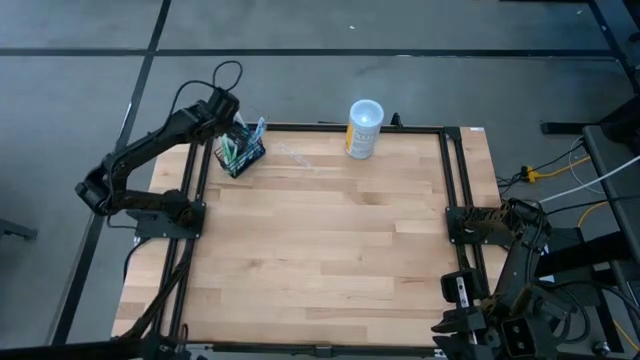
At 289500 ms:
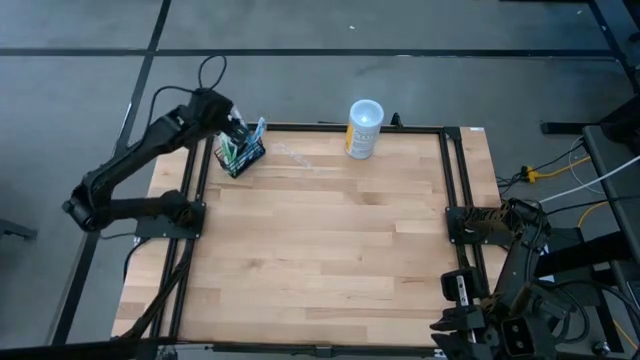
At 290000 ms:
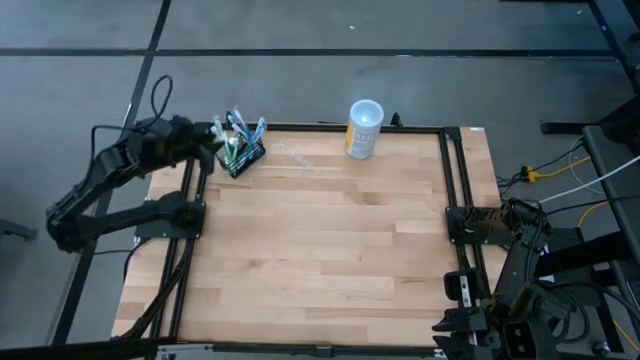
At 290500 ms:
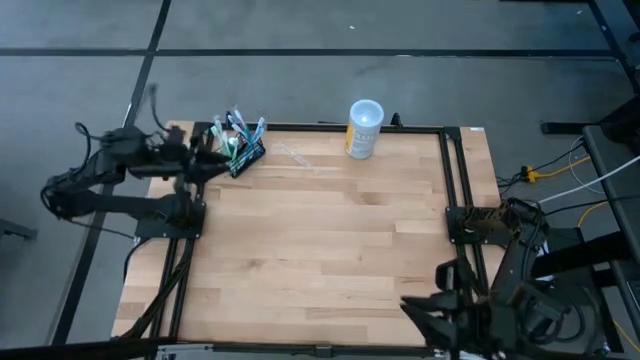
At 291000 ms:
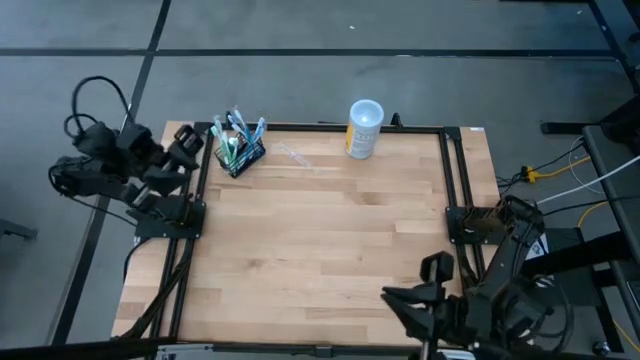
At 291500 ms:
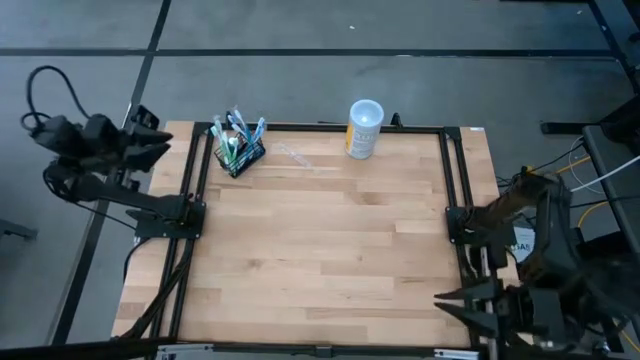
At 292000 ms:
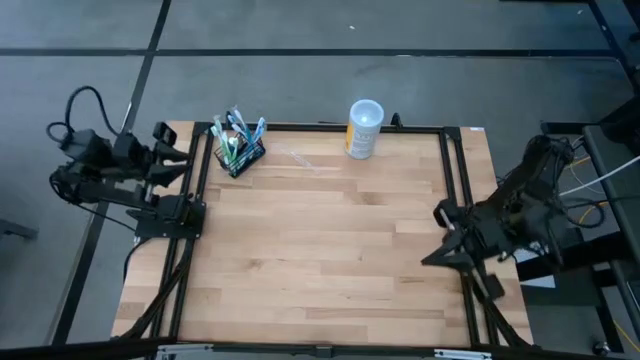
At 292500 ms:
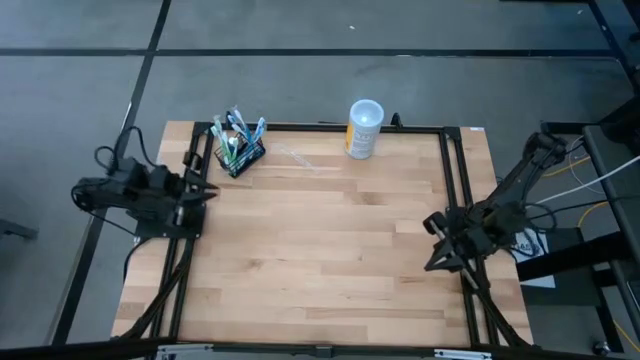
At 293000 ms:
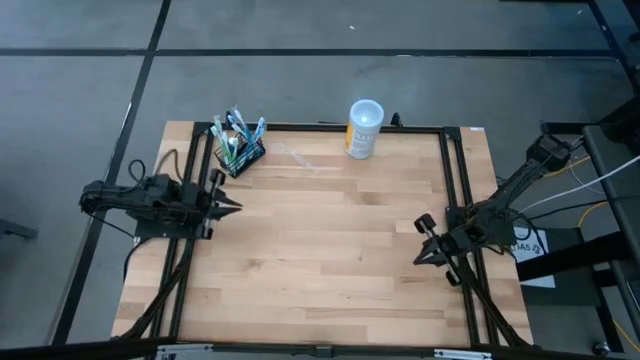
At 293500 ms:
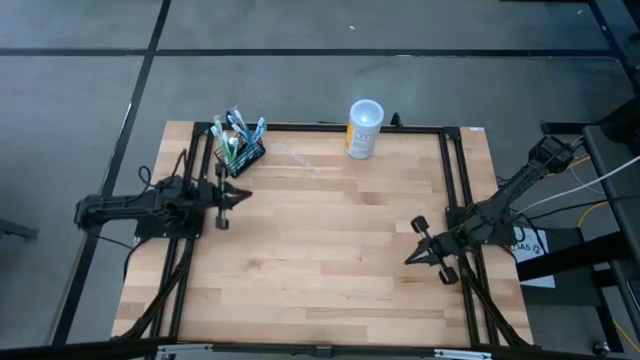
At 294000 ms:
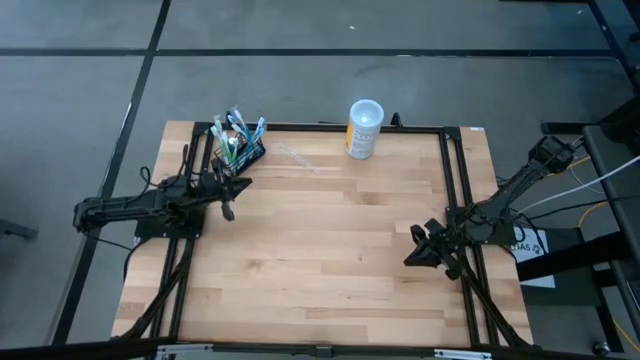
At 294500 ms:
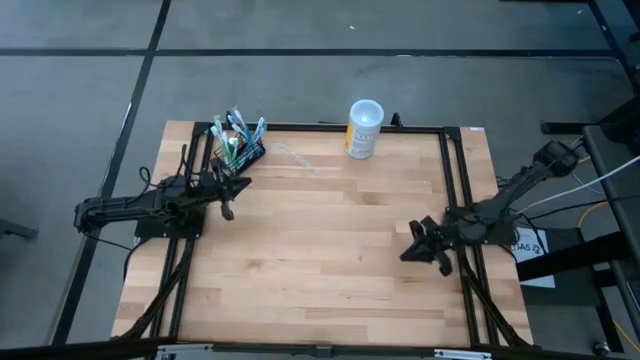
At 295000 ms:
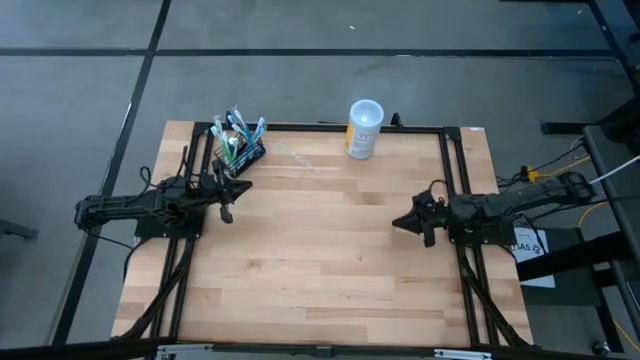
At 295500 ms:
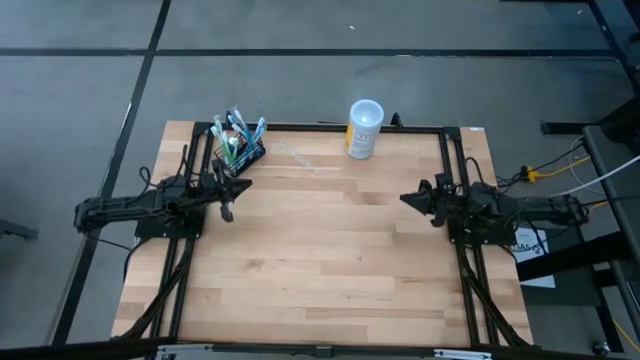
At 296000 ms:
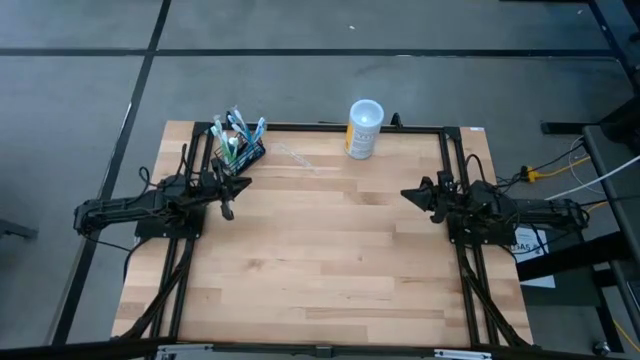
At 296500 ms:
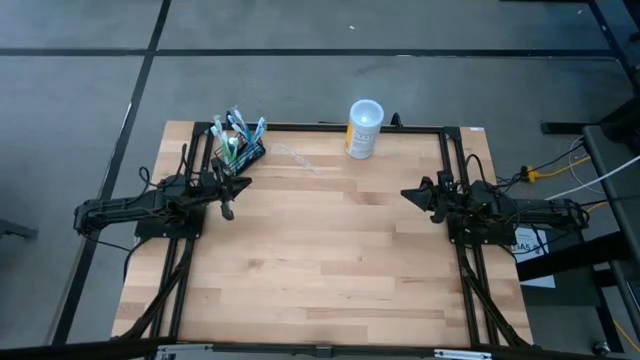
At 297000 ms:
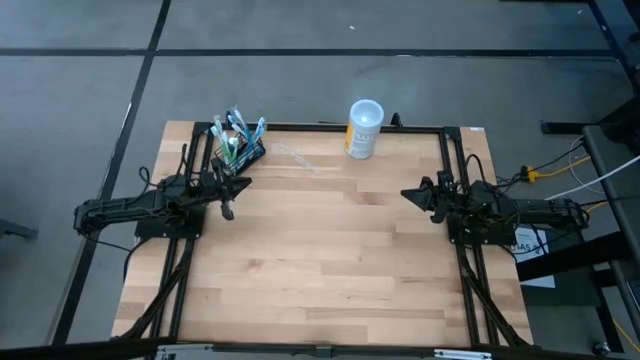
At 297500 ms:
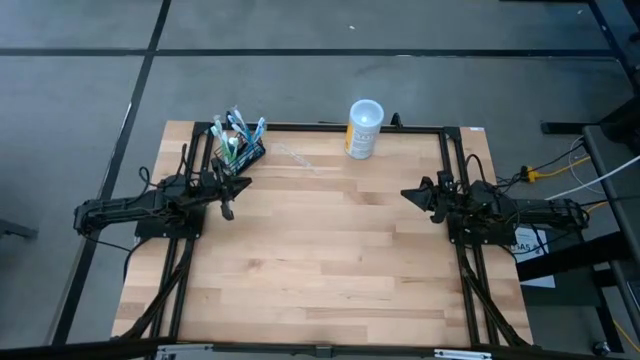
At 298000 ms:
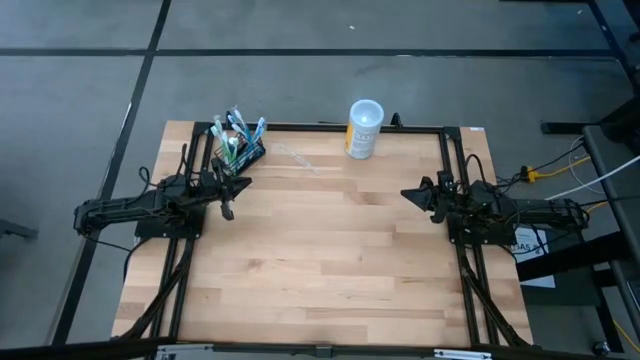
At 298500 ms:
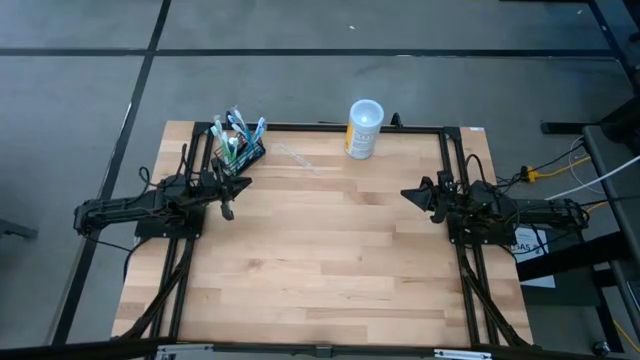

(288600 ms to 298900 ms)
Task: Pick & Place toothbrushing station
Return to Home Position

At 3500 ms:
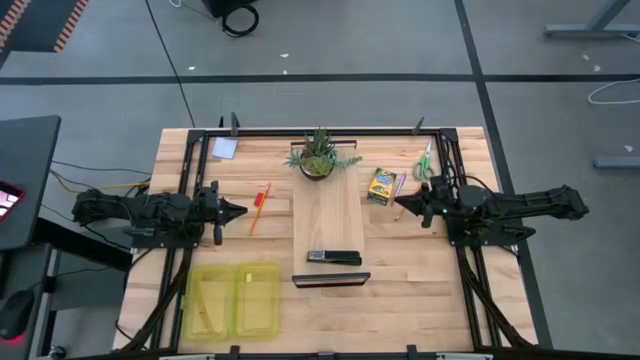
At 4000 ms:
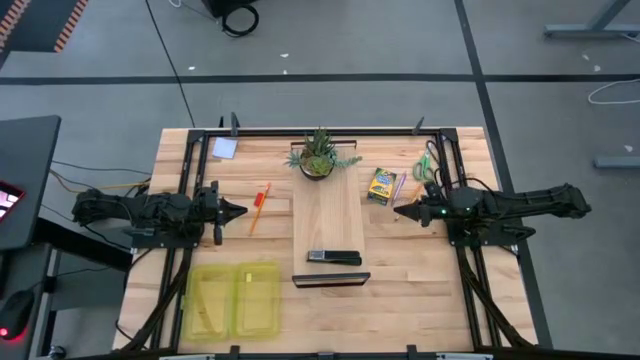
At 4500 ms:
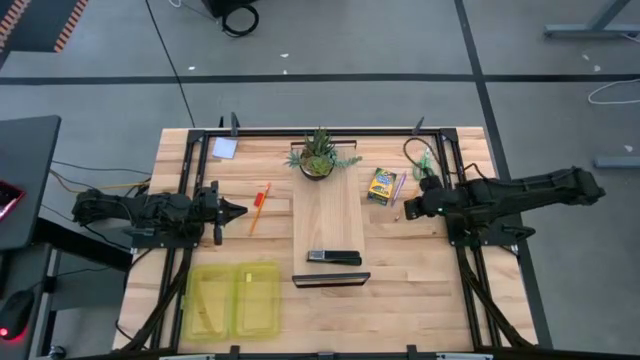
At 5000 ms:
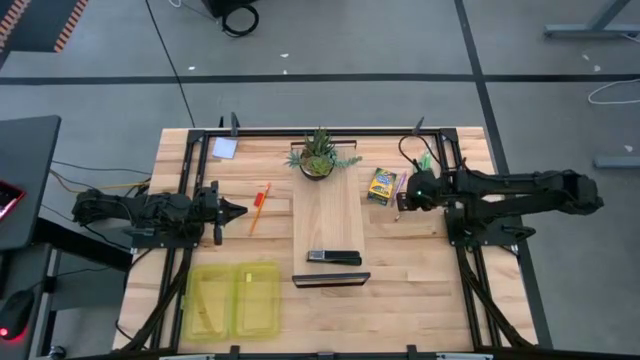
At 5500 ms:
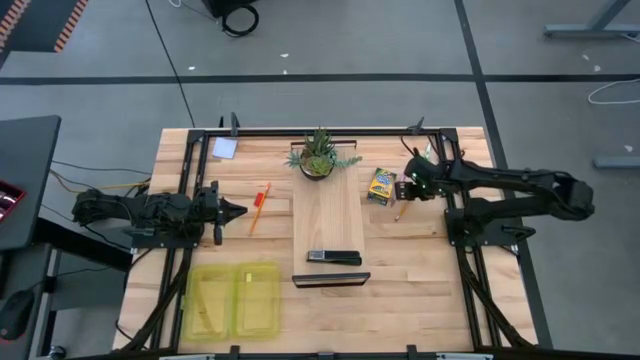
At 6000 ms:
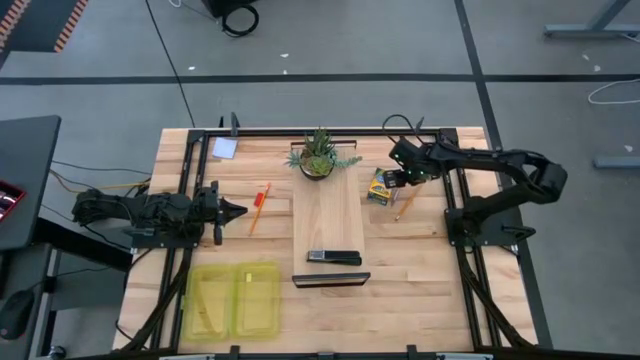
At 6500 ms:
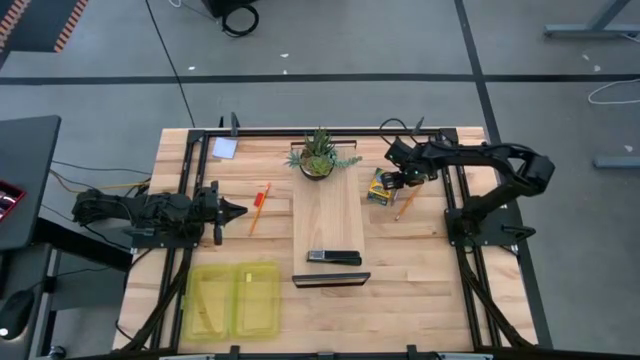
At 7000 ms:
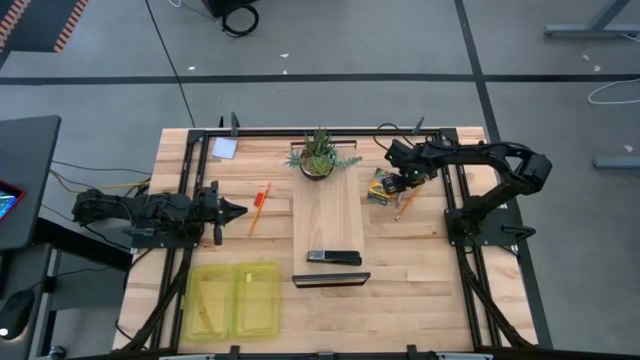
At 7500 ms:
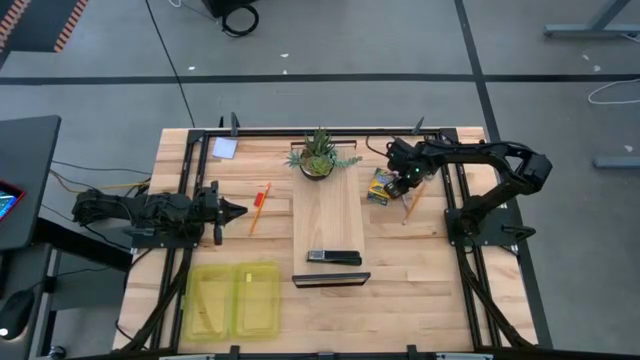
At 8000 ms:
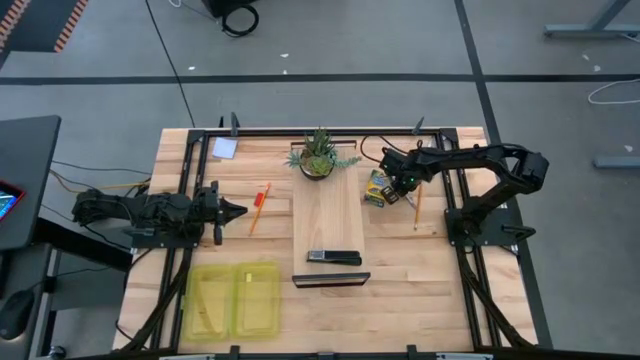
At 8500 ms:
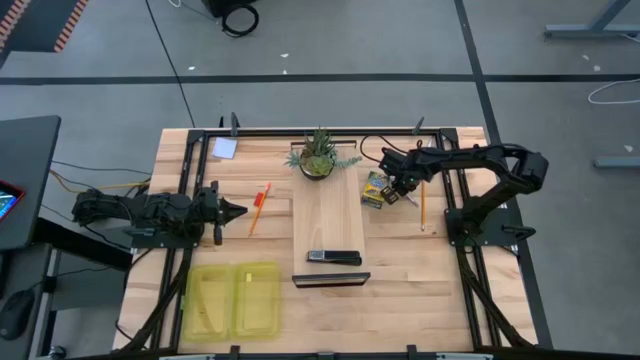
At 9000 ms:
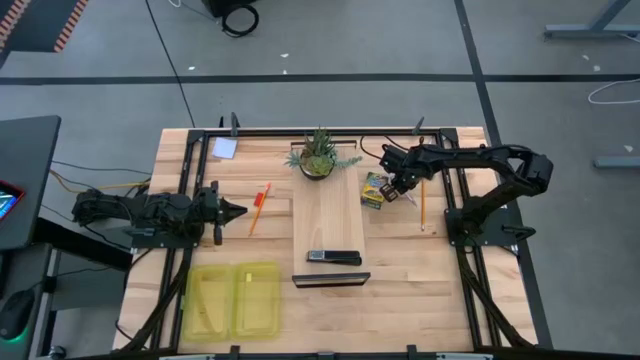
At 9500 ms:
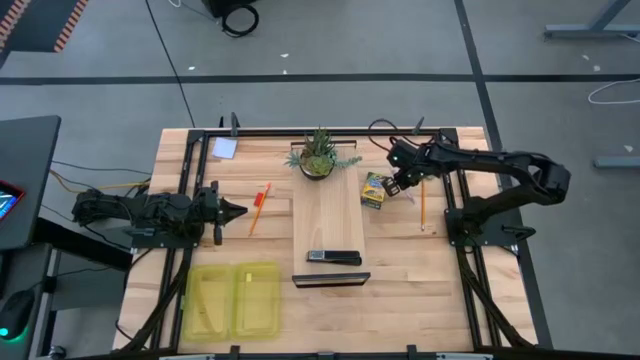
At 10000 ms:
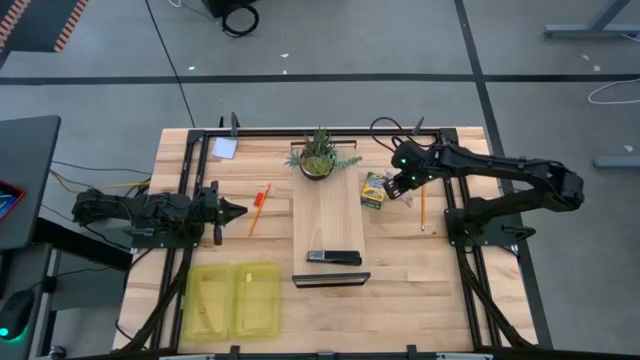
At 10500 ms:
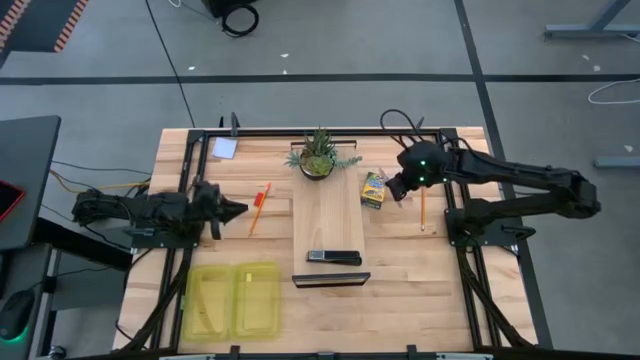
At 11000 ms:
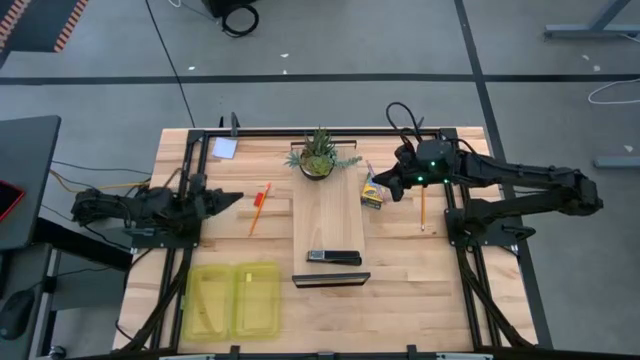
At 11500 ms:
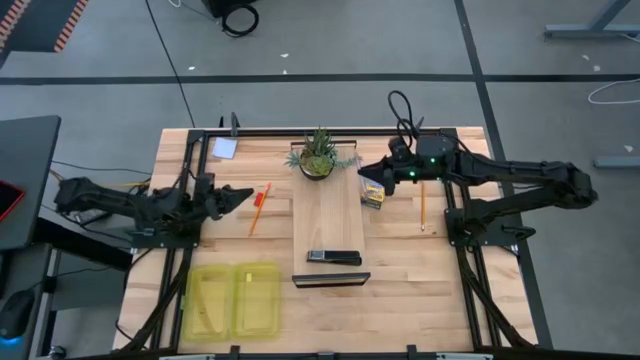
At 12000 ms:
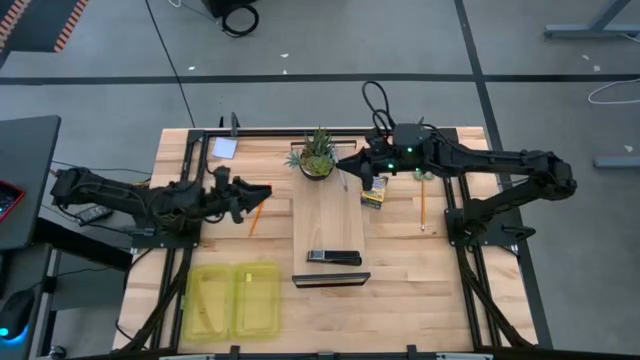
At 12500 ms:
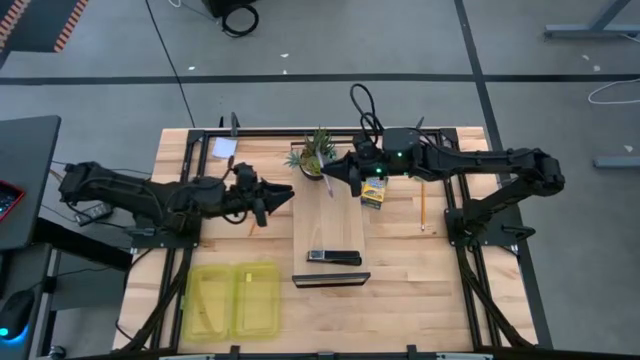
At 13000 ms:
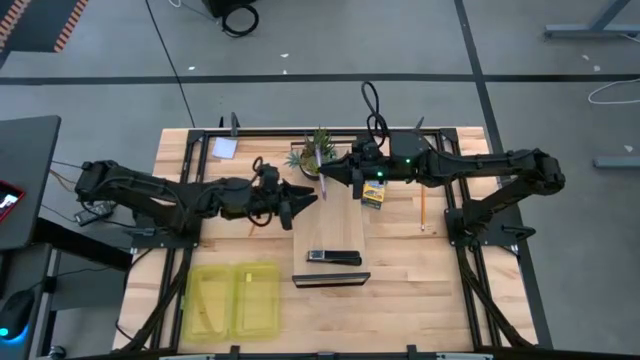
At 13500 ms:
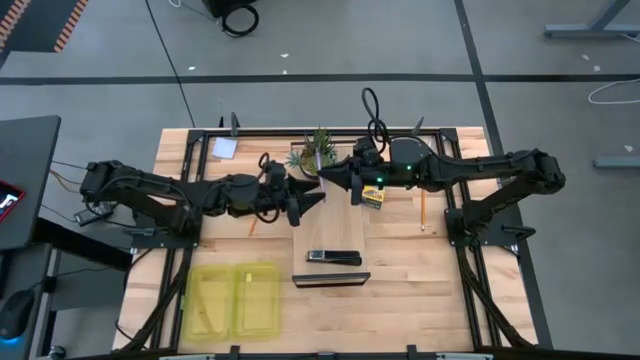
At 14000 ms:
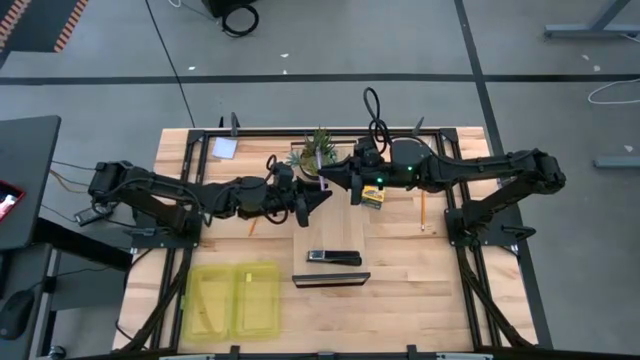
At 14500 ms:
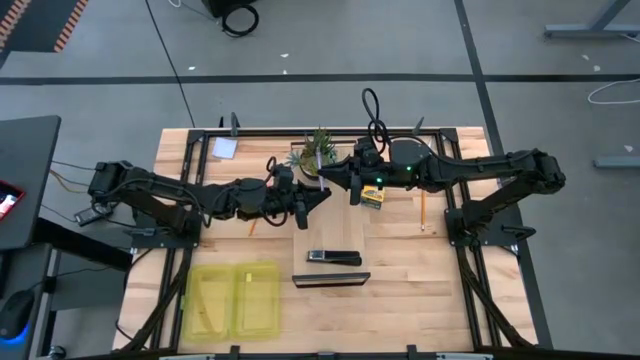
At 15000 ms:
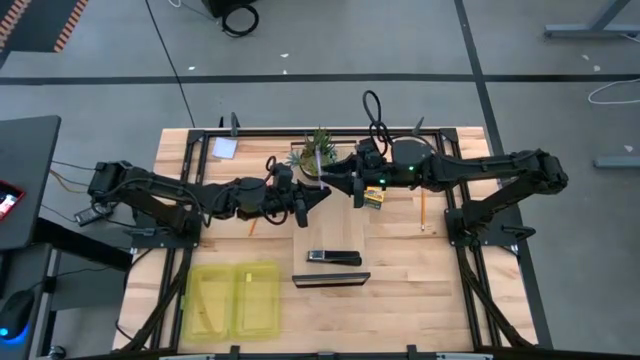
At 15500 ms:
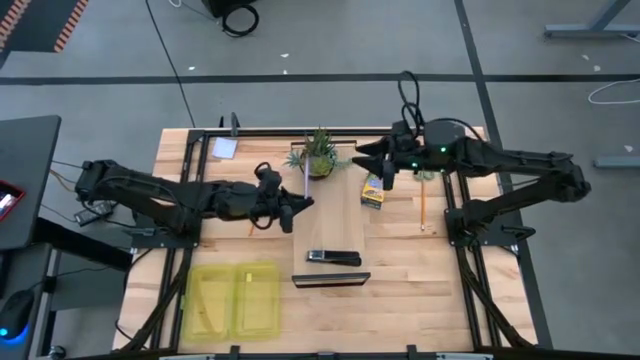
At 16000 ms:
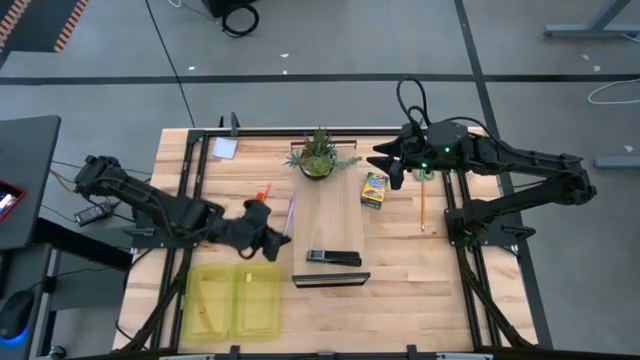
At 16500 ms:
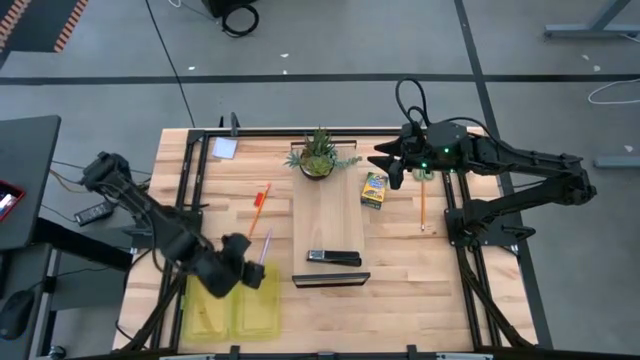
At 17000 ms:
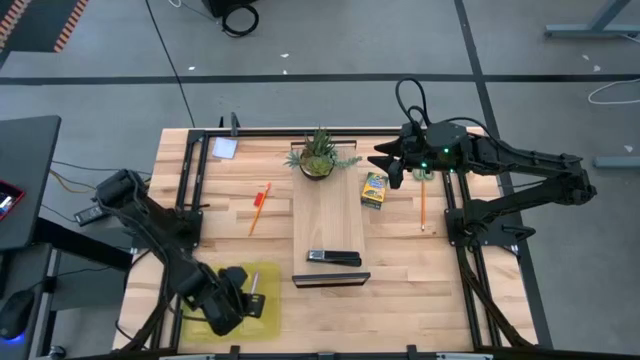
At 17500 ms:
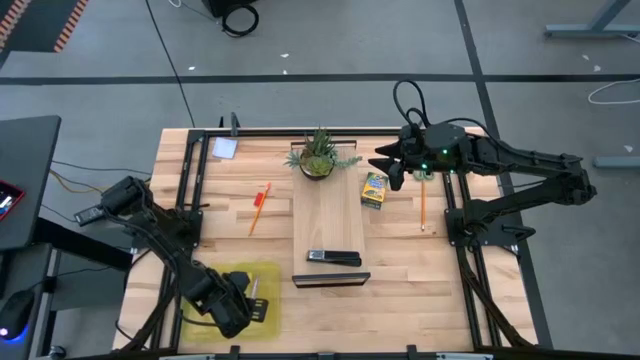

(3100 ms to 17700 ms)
Task: Pack school essentials
Put the pink pen into the yellow supply box
